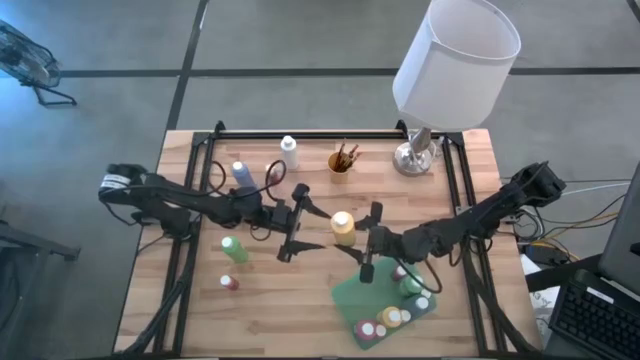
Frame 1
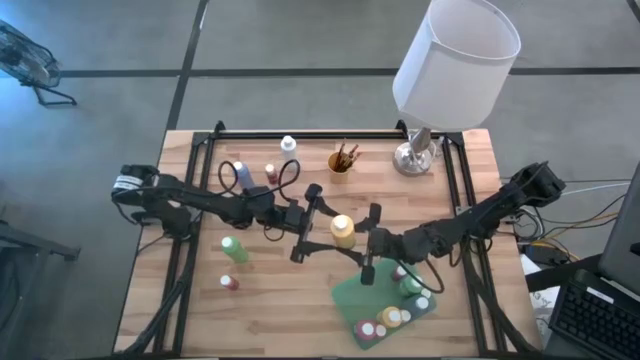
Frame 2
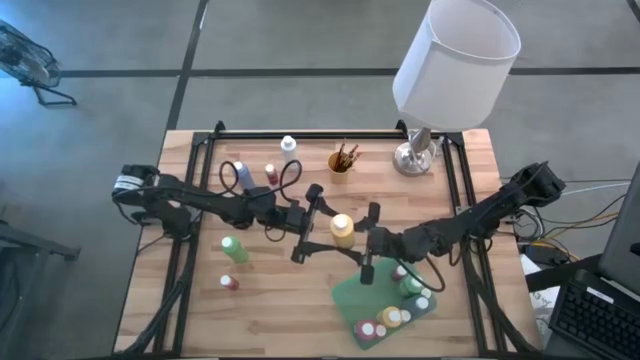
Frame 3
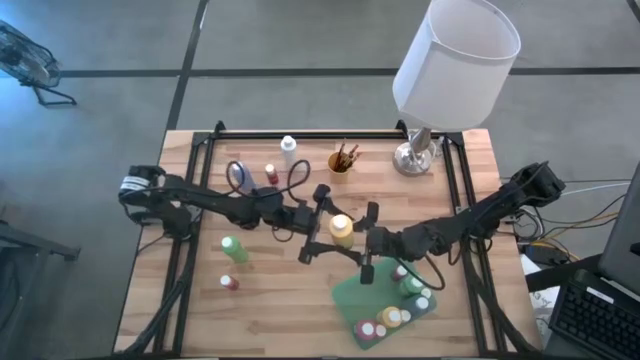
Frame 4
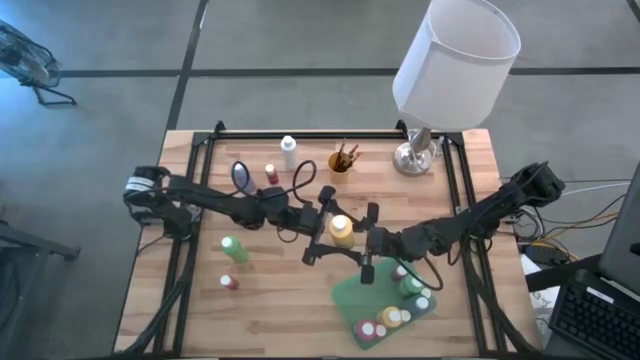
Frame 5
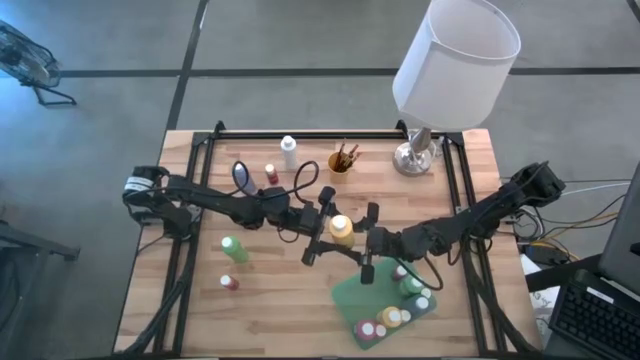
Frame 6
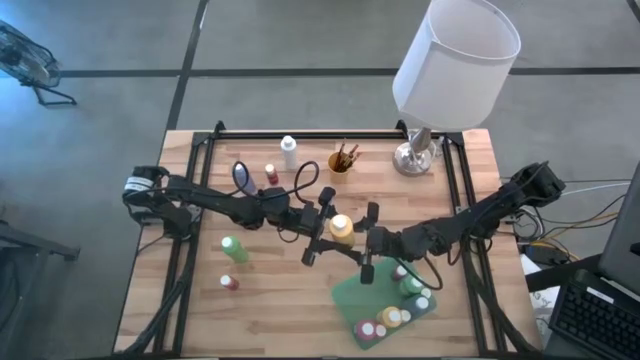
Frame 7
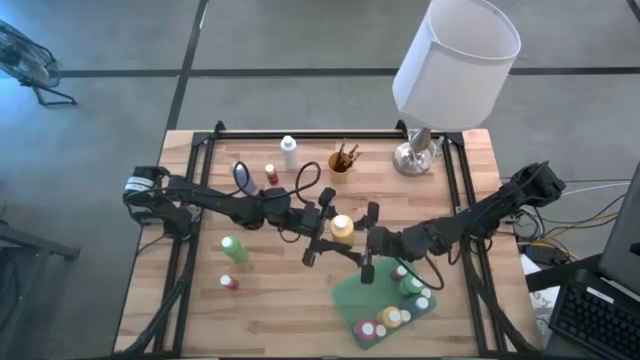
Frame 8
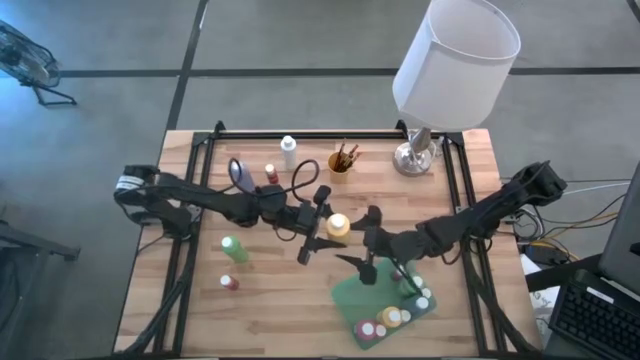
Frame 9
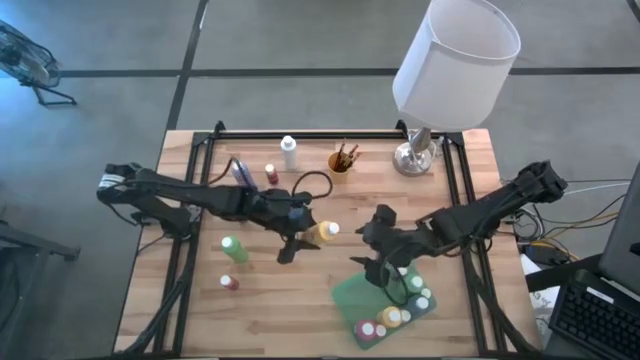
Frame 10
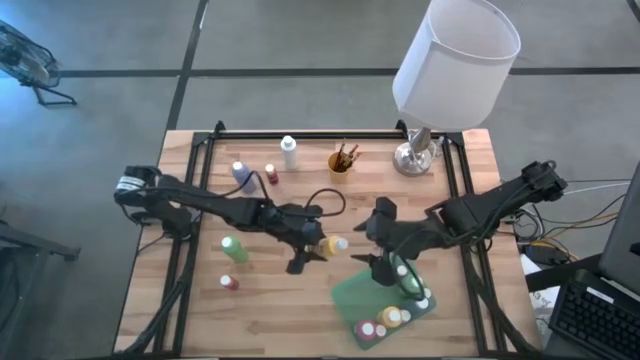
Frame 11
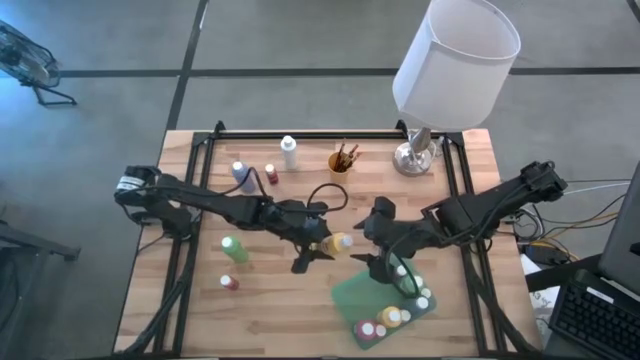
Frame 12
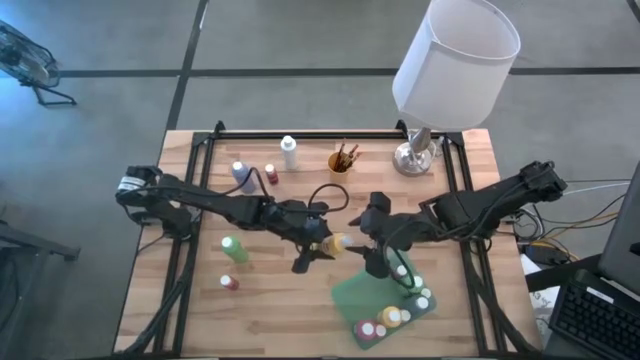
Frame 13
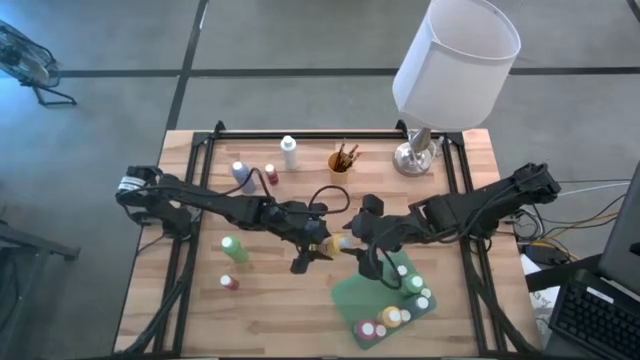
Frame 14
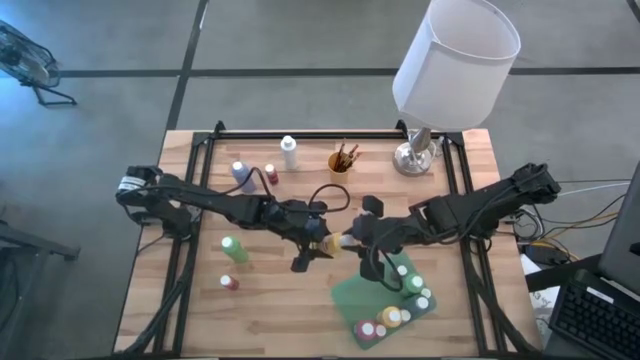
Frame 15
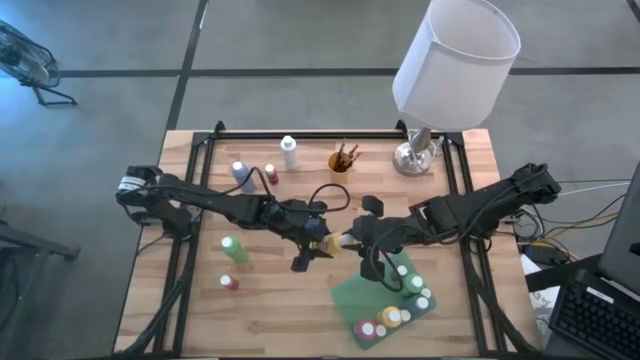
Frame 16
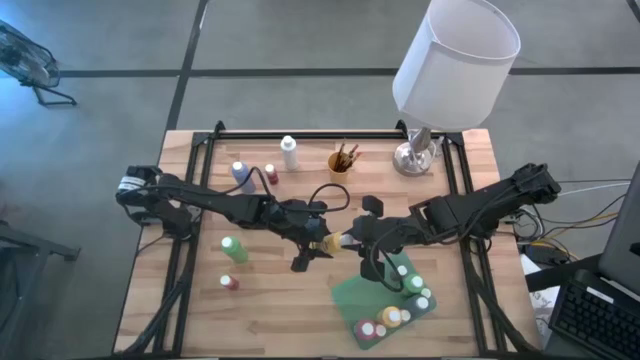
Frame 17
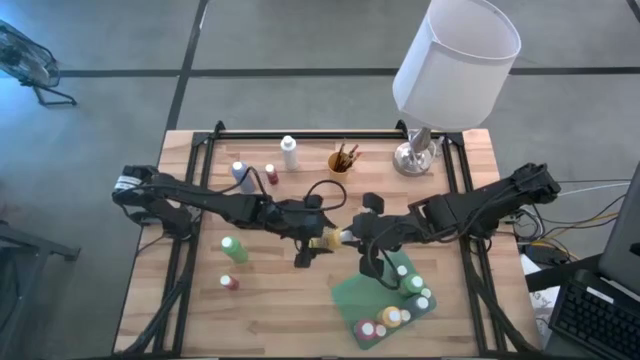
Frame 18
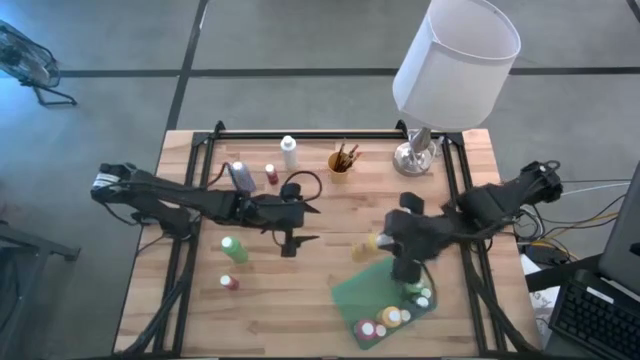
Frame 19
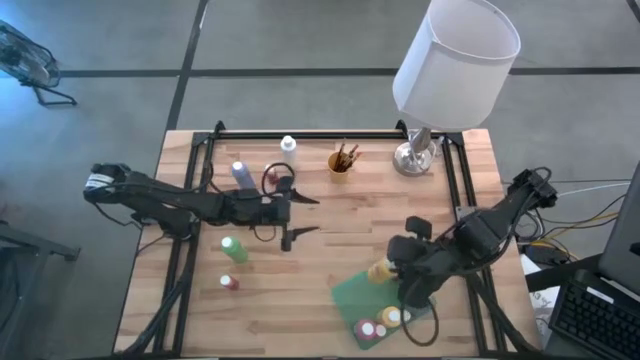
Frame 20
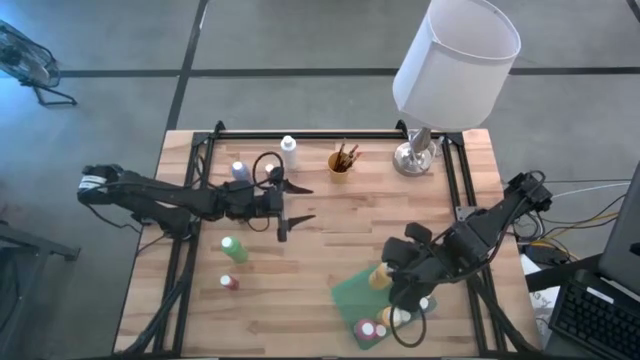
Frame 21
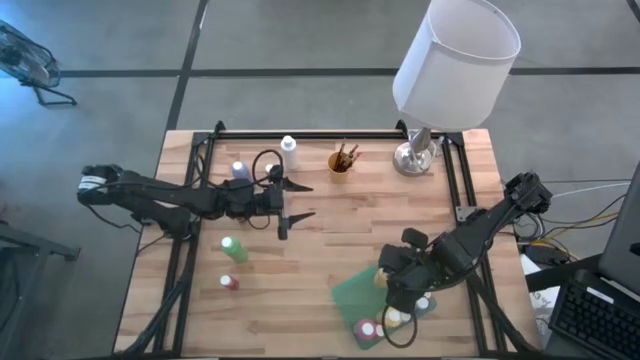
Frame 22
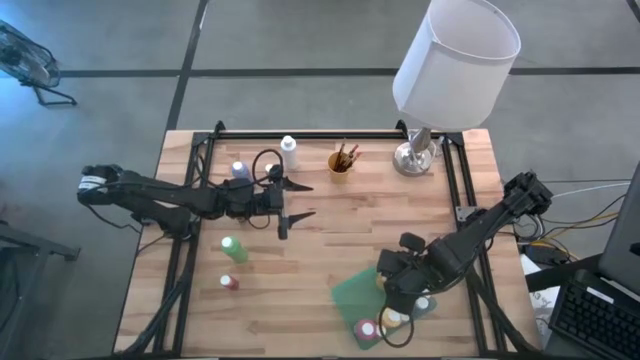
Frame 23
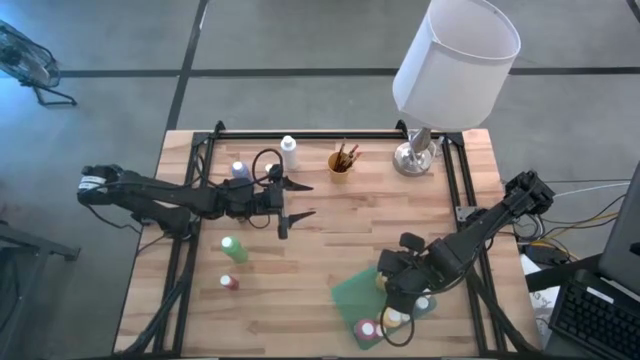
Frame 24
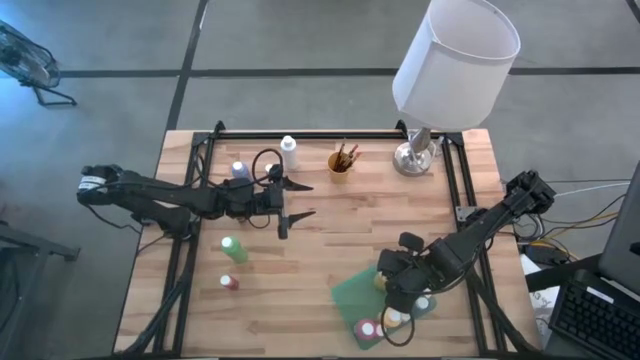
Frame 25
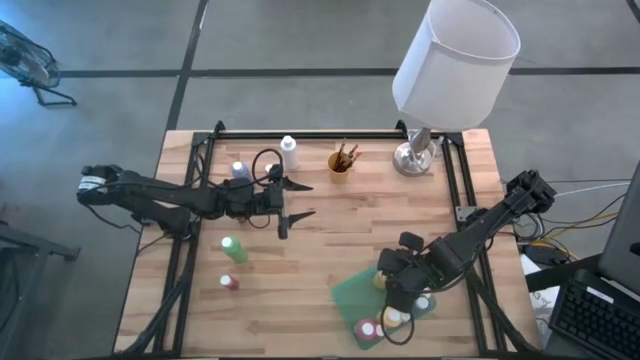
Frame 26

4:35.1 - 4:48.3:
Task: Pick & Place Paint Supplies
Put the yellow paint bottle into the green bin

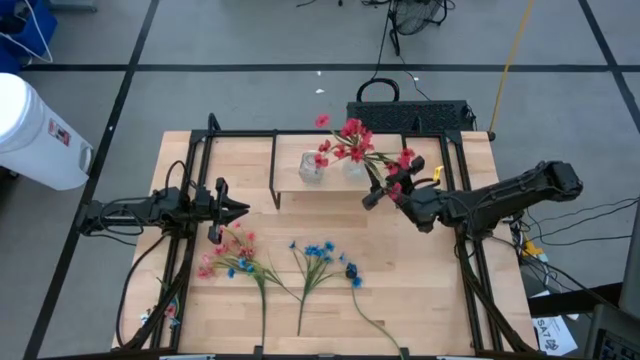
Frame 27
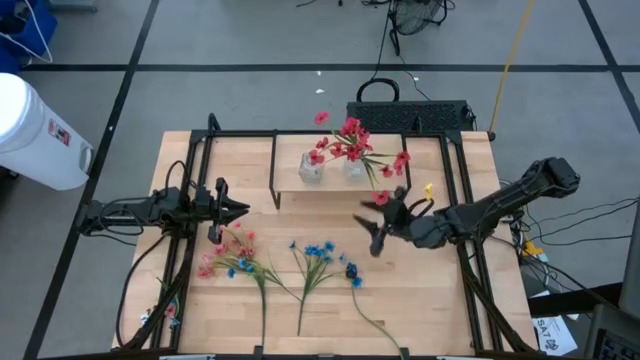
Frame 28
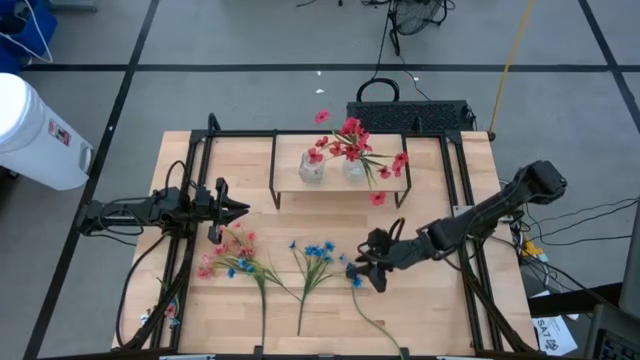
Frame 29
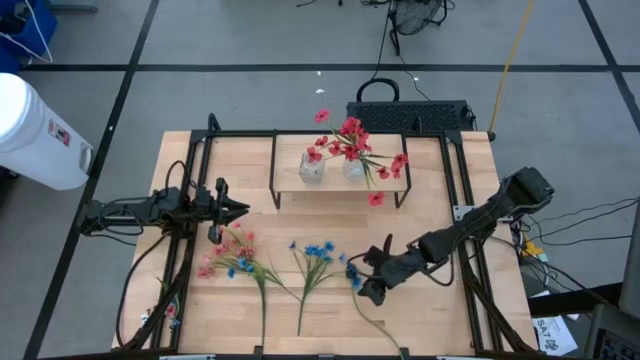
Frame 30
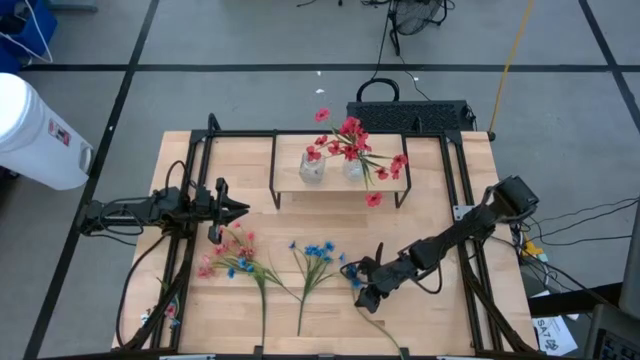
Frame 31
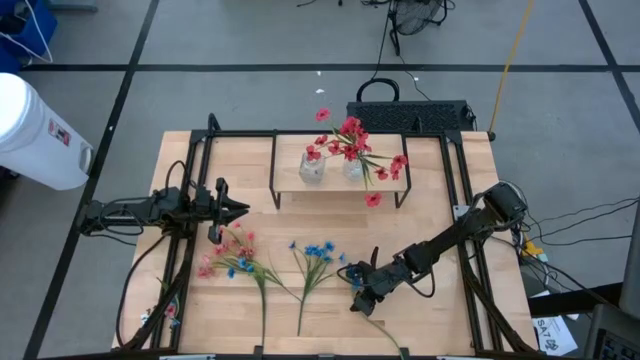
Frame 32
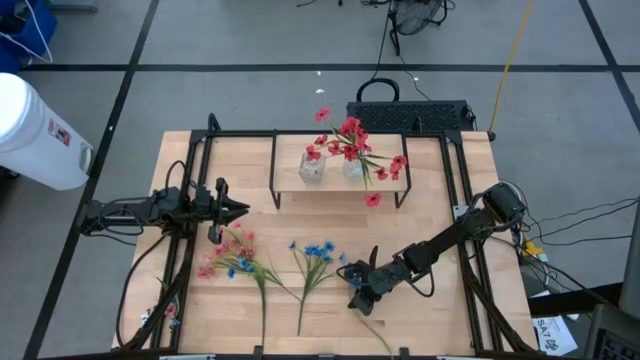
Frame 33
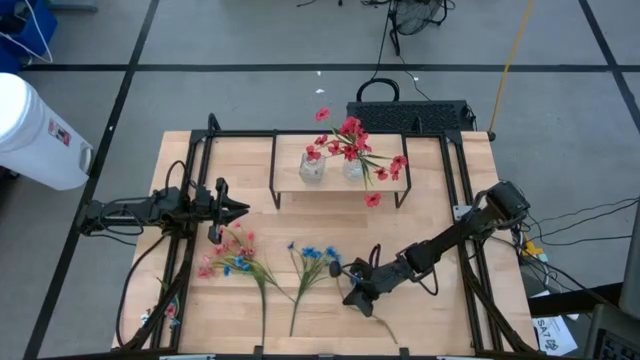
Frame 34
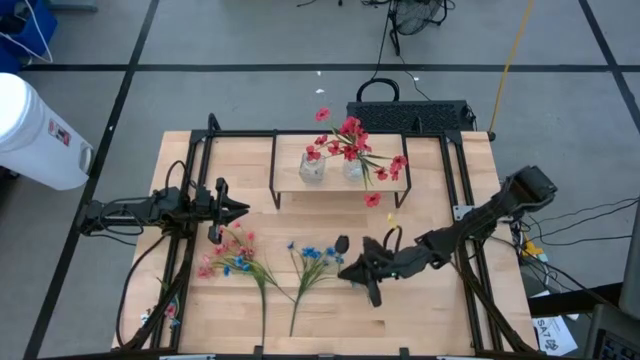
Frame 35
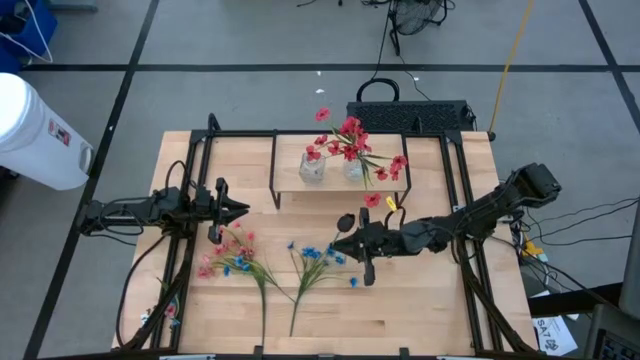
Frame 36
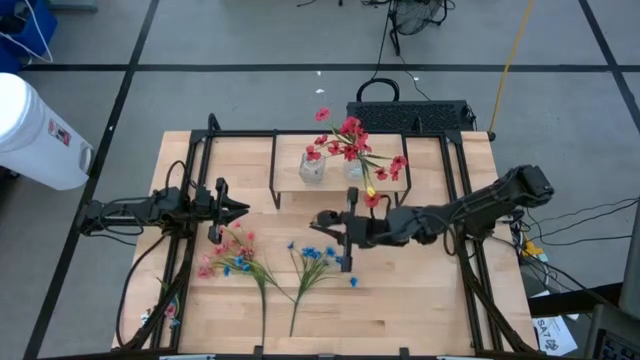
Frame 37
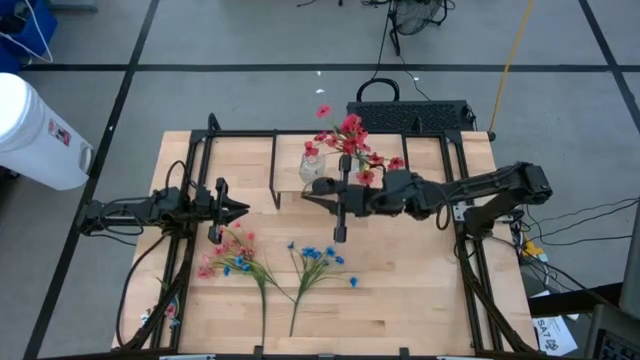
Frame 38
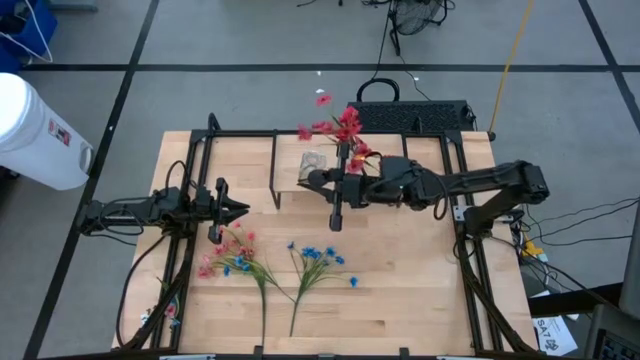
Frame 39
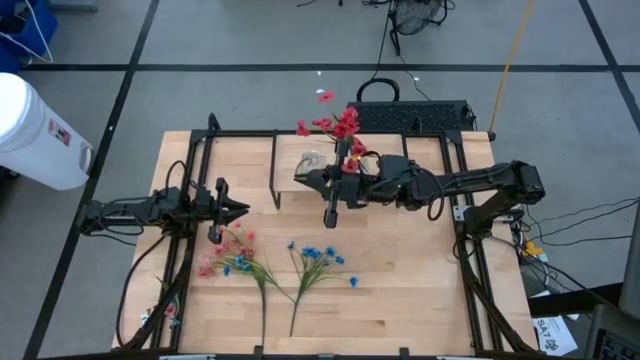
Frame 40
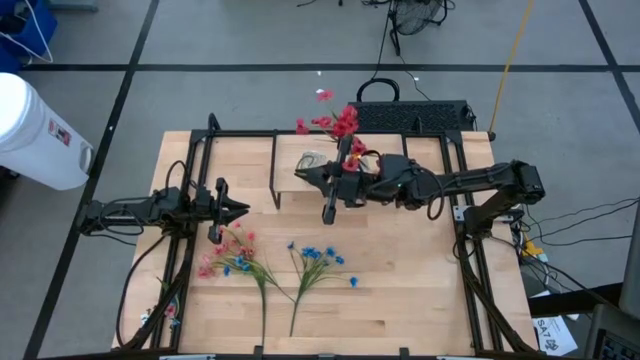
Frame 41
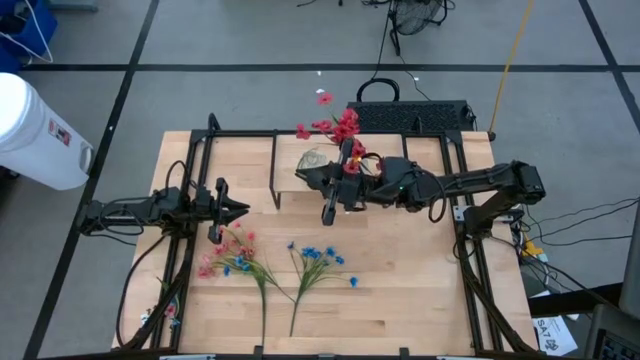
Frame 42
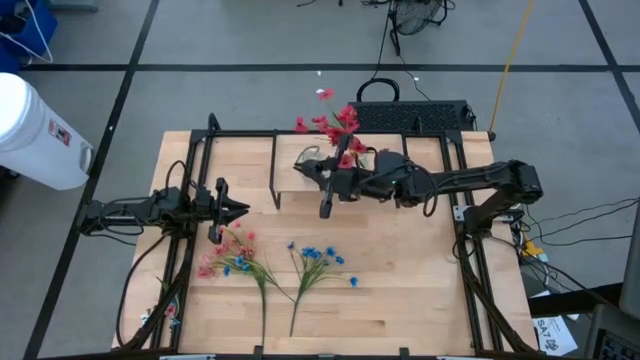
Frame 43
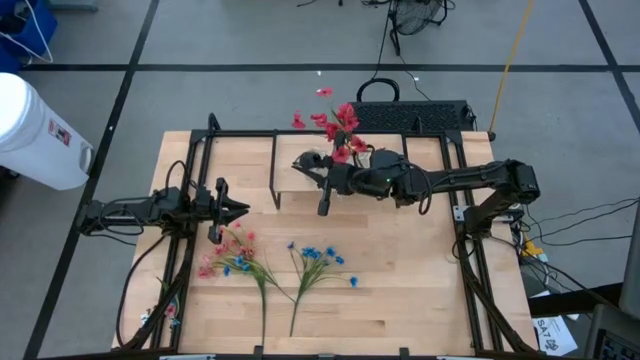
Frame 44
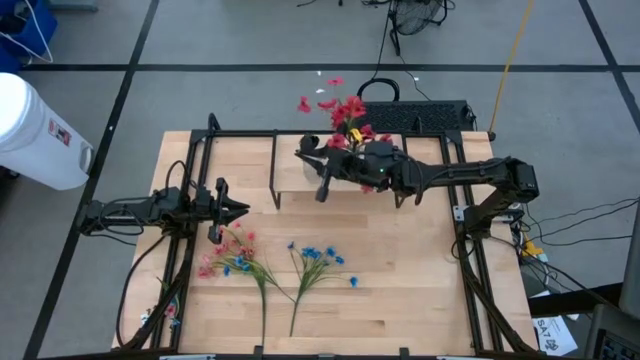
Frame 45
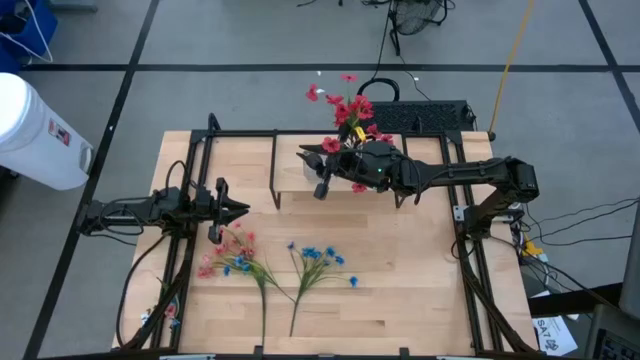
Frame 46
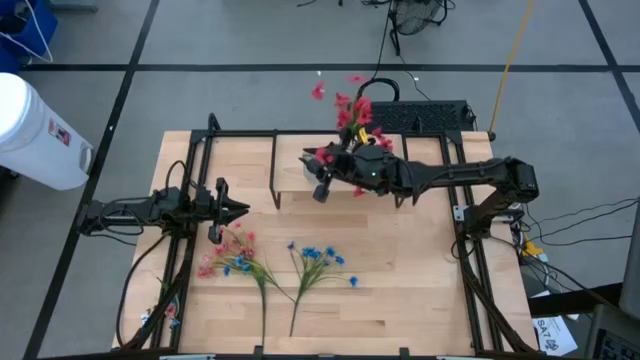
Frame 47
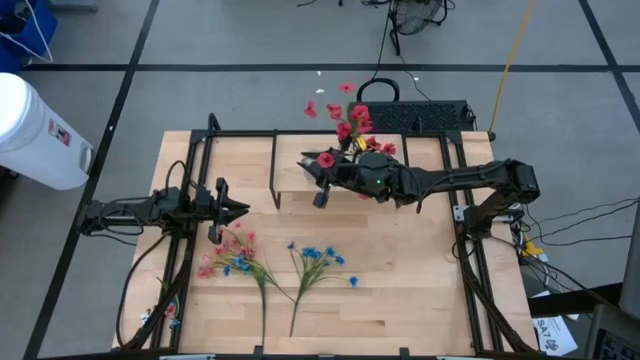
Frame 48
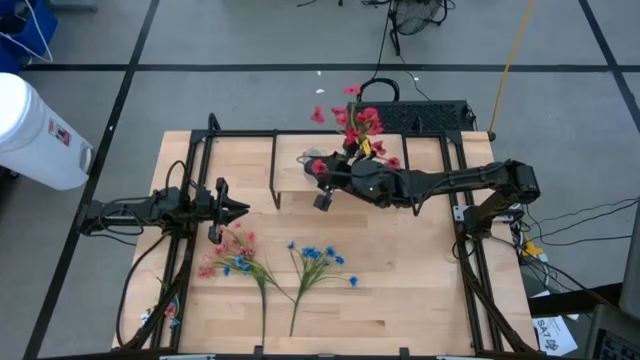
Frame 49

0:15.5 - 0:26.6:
Task: Pick and place flowers into a vace then onto a shelf
Put the black tulip into the left transparent vase on the shelf
